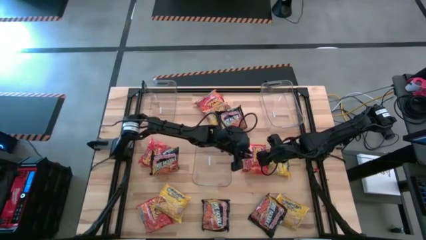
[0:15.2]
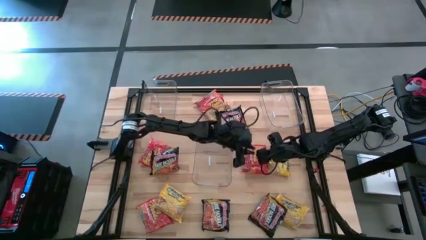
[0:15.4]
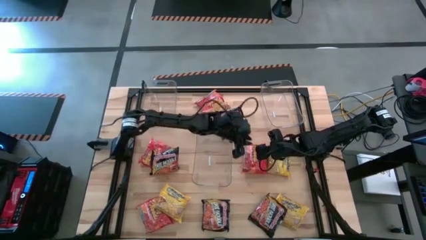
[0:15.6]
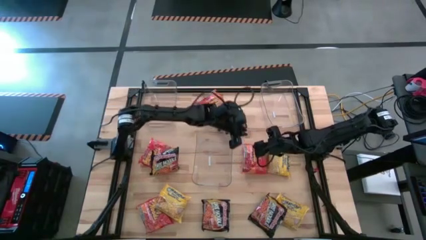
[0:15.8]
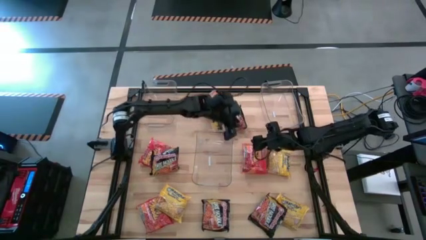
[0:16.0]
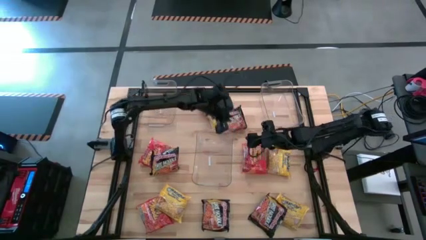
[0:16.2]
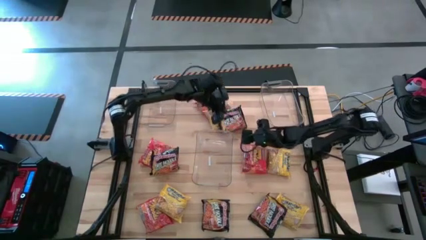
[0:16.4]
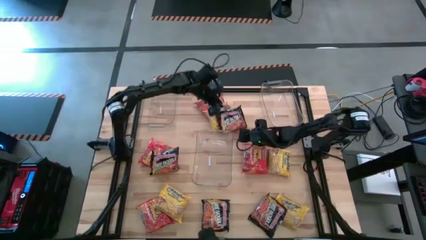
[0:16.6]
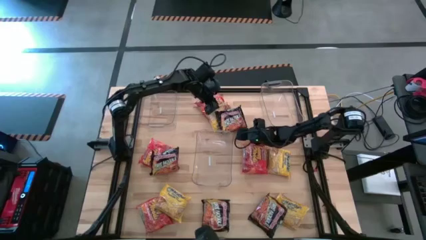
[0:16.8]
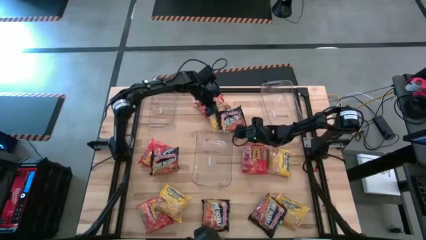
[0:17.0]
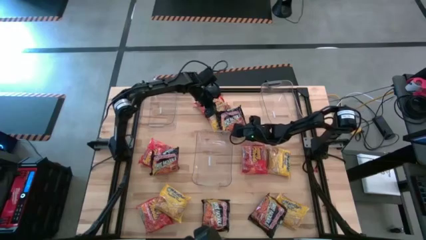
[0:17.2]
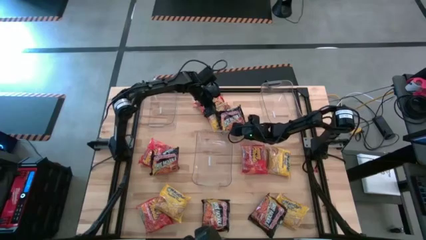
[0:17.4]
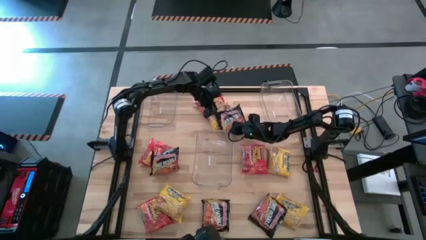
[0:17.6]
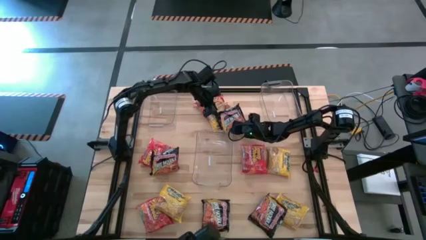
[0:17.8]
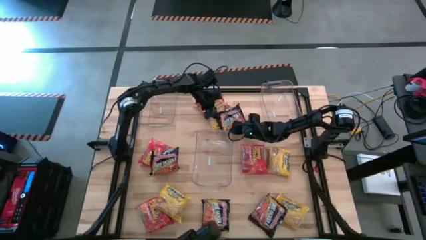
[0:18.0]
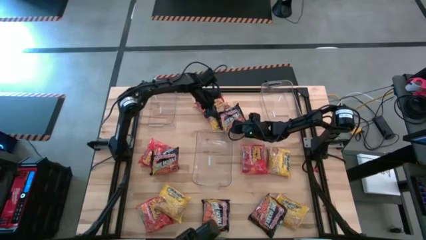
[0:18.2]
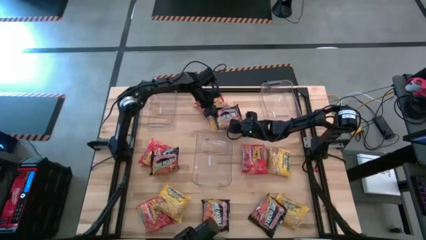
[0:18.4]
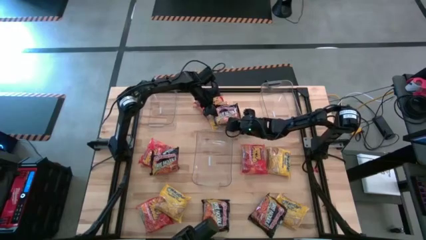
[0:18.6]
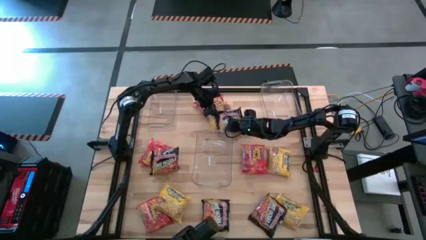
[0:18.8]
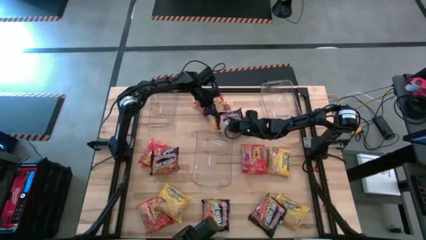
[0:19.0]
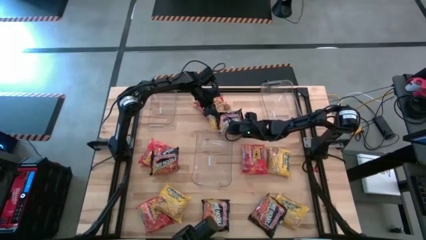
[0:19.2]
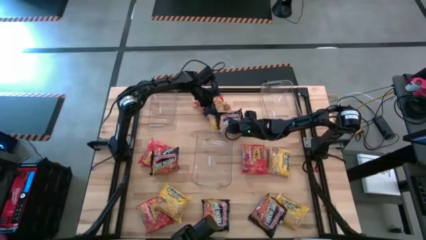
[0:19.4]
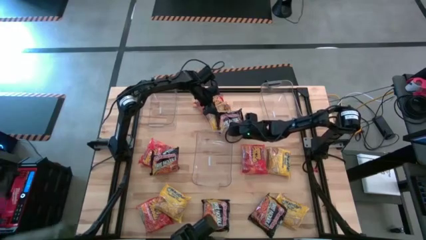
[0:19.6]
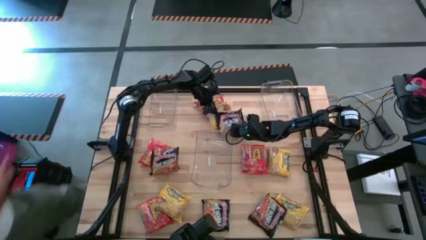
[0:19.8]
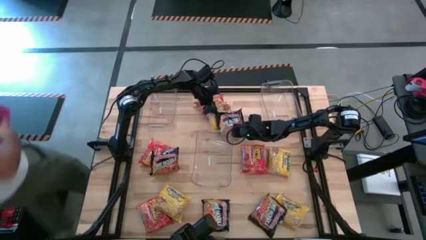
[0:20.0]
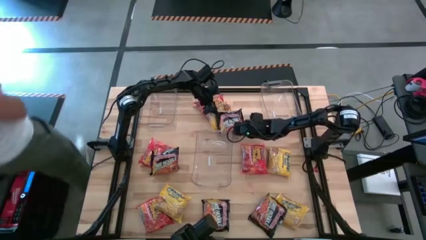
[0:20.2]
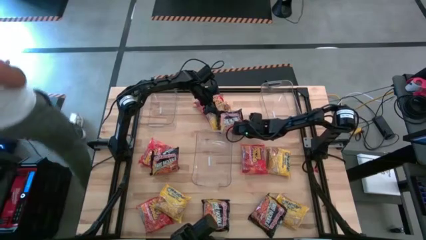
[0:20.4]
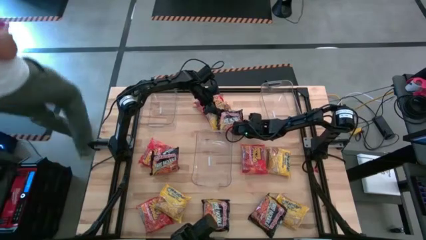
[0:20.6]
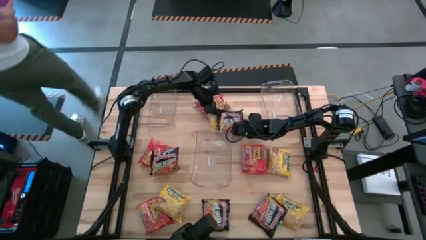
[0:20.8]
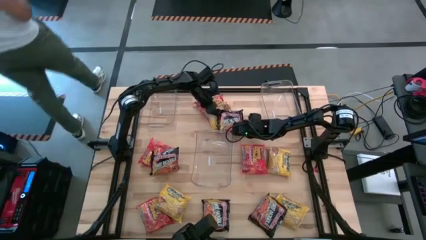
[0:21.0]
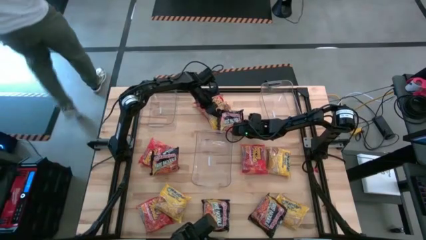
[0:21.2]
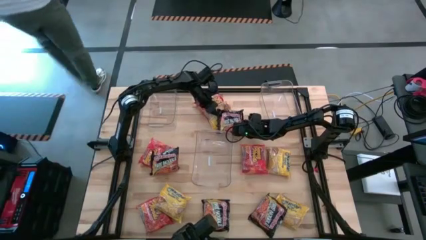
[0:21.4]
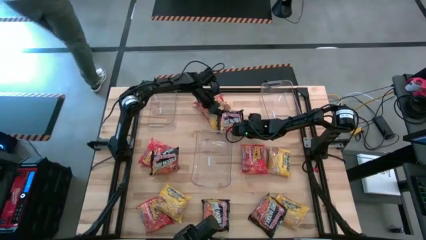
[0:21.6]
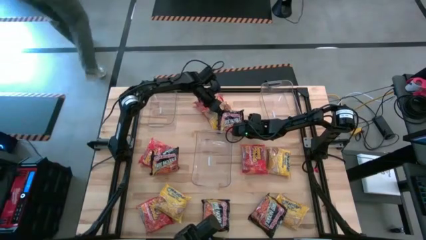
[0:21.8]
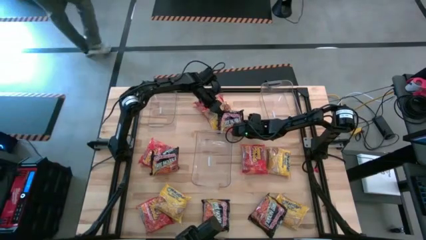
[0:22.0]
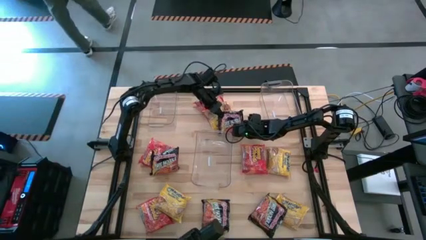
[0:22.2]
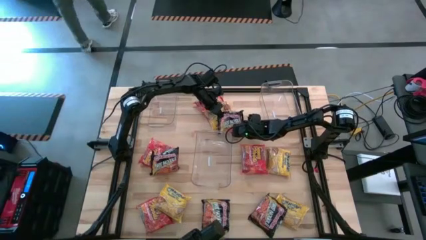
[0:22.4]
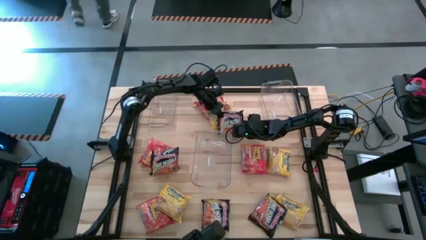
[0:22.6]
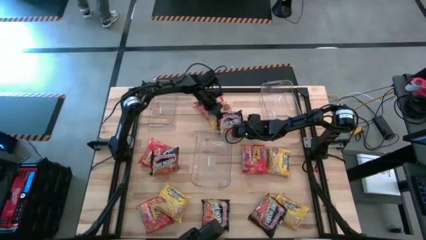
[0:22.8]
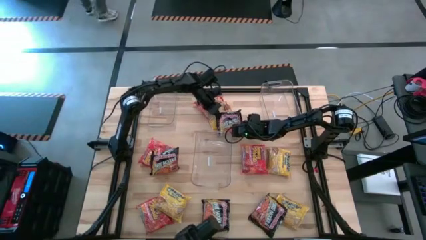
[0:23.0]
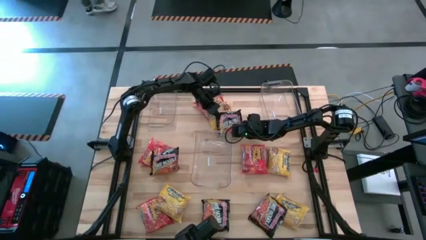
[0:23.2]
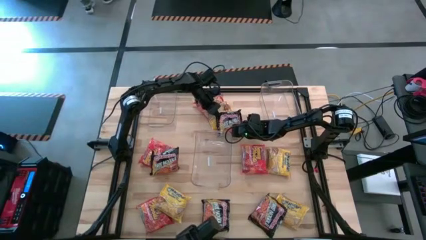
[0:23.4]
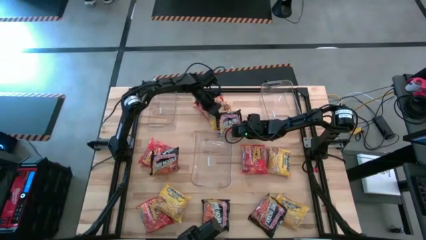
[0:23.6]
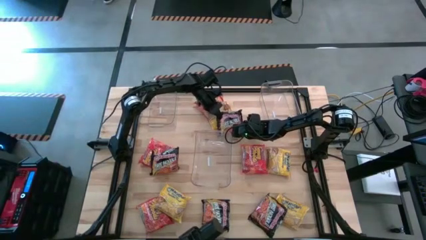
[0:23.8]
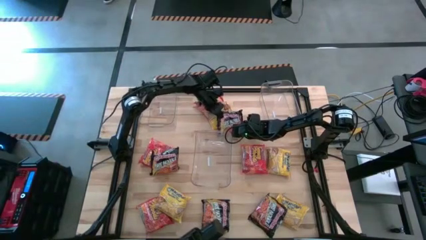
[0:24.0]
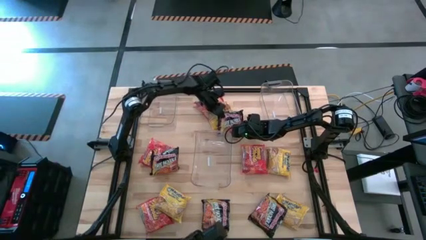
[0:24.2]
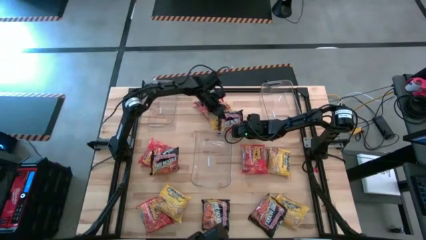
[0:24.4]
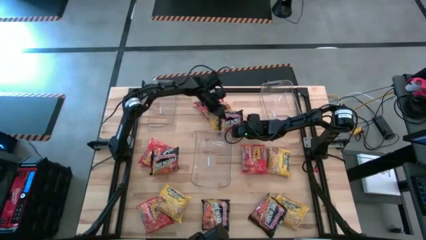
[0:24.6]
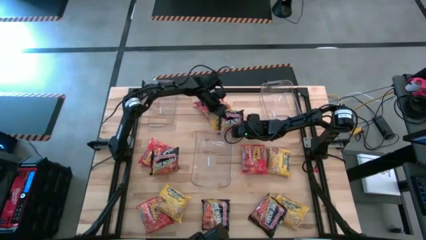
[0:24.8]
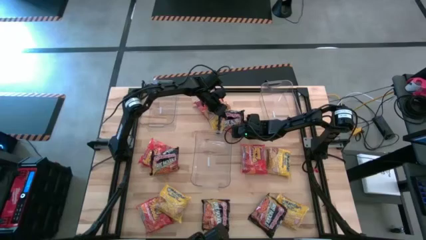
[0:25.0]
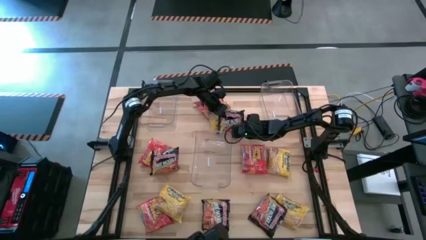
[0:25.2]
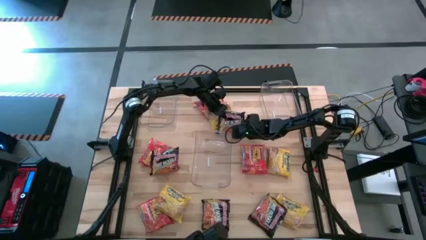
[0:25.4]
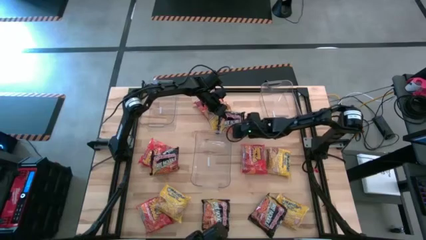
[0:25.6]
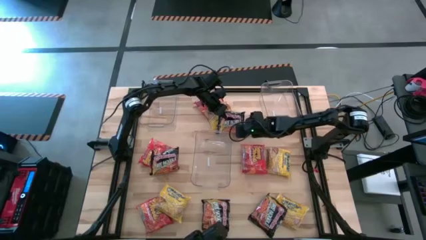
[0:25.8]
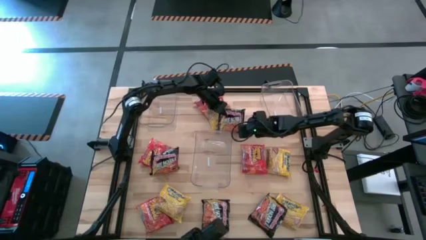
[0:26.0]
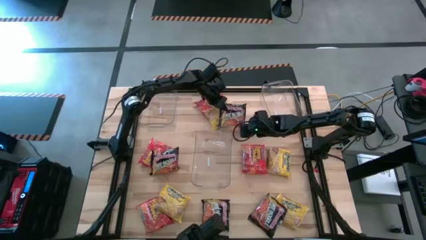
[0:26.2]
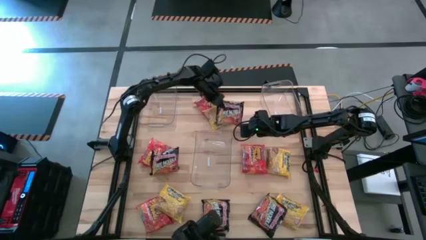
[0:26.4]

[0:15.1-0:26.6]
Task: Sort Maruchan noodles
Put the black noodle pack into the top right transparent bin
